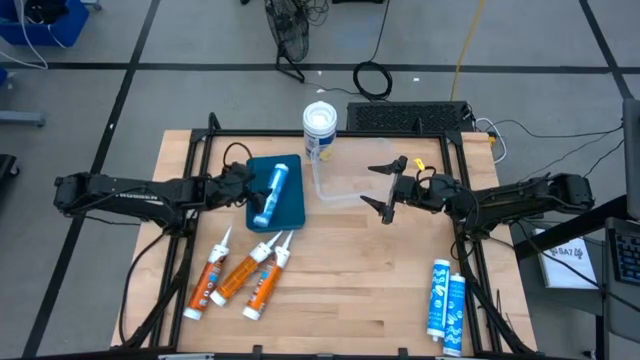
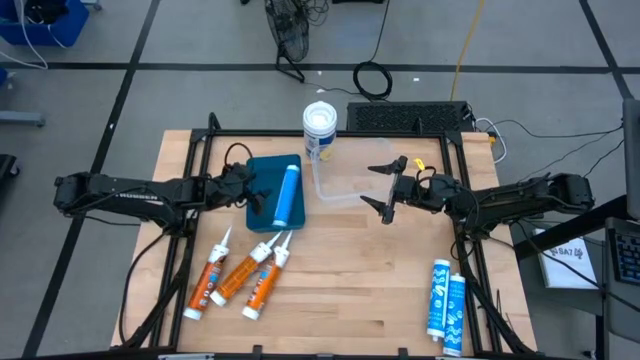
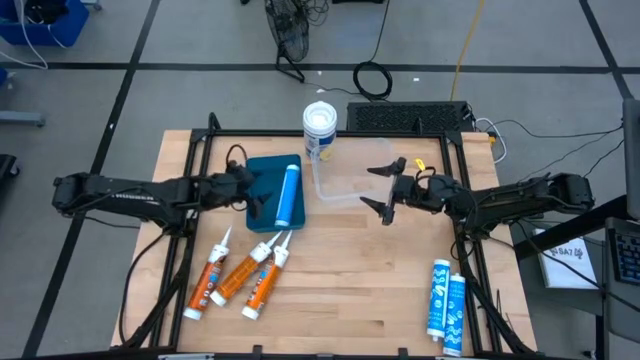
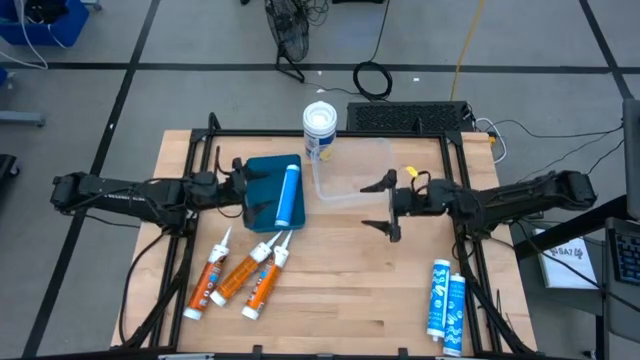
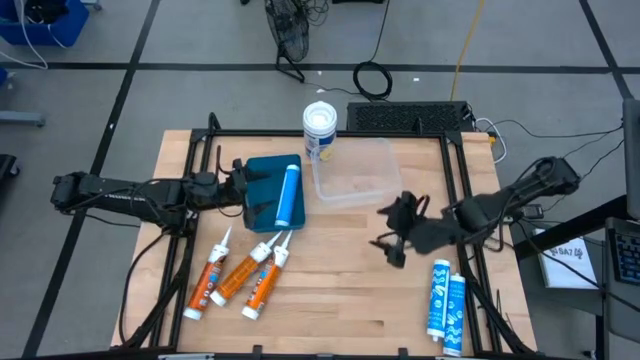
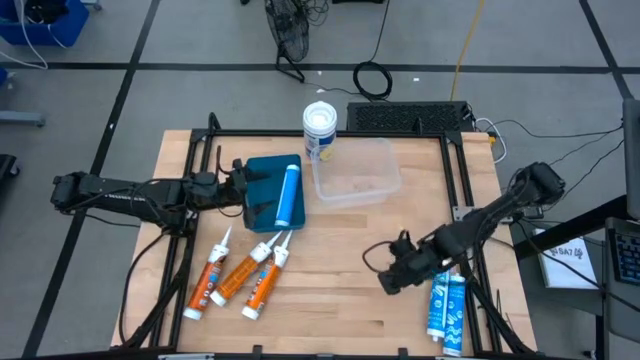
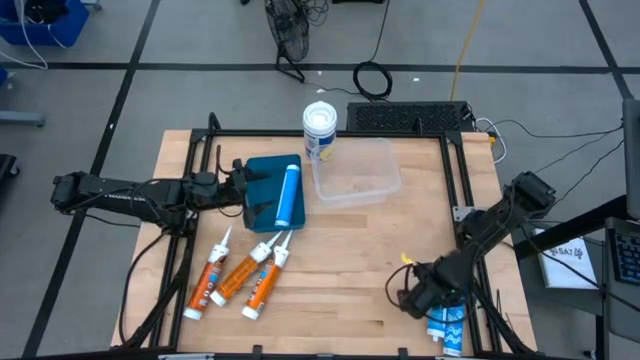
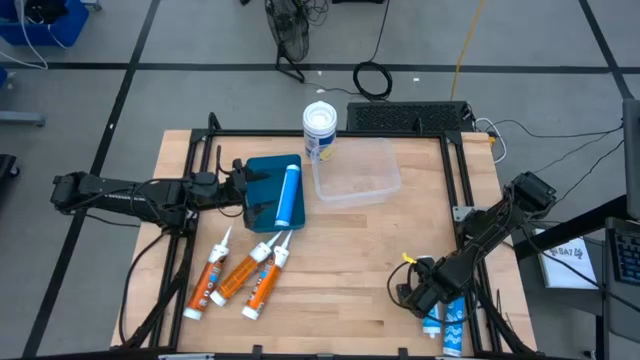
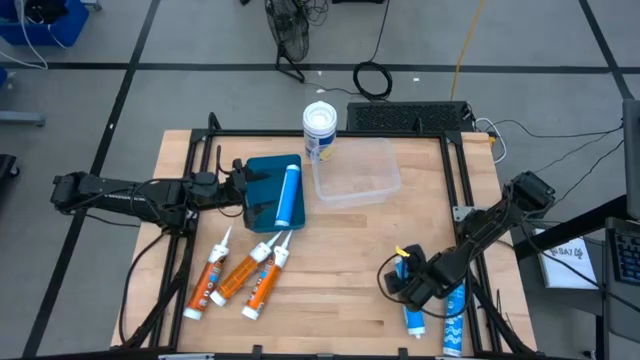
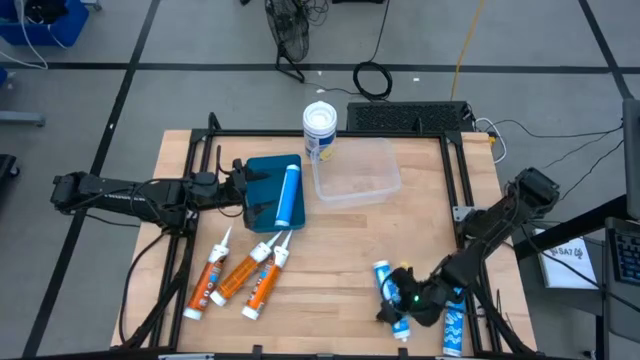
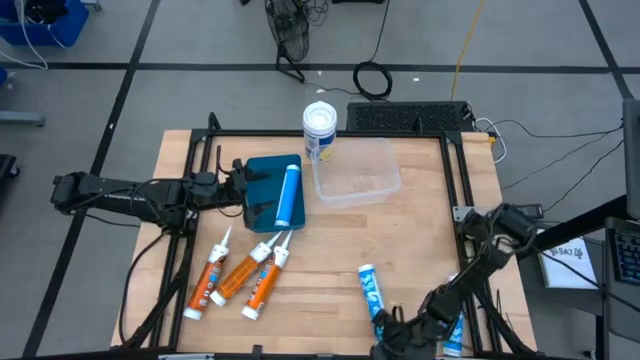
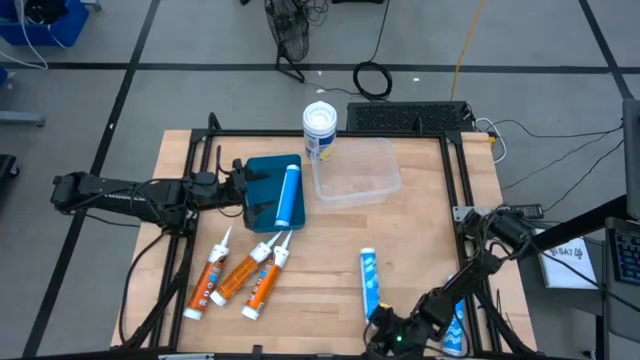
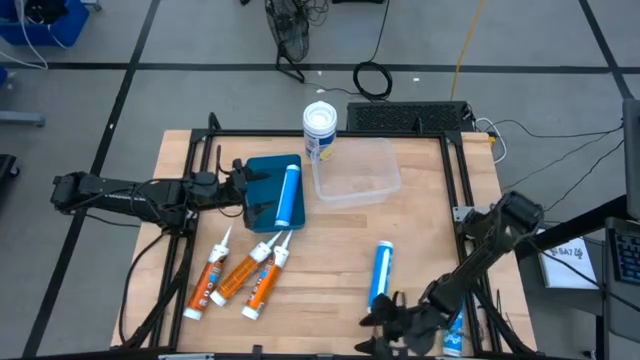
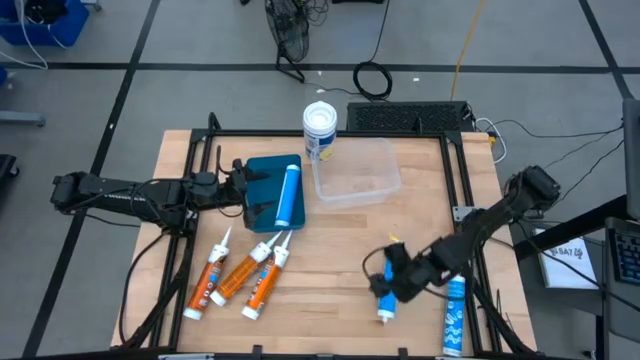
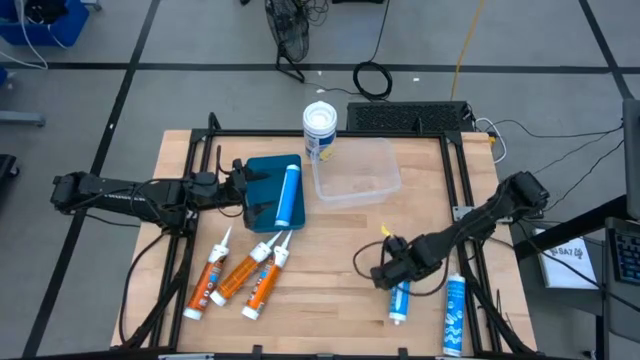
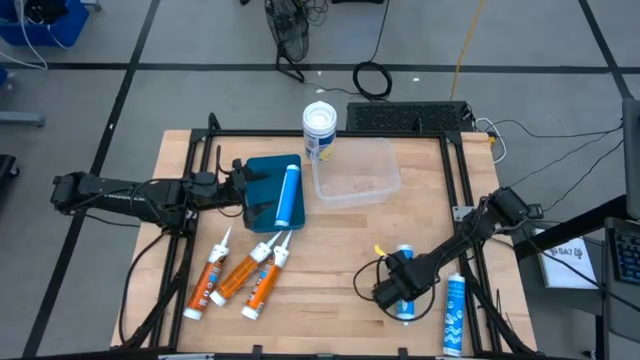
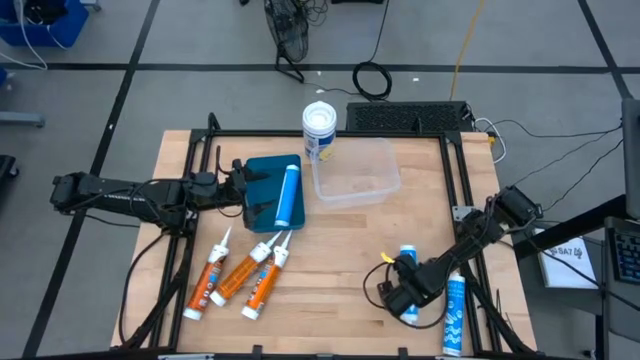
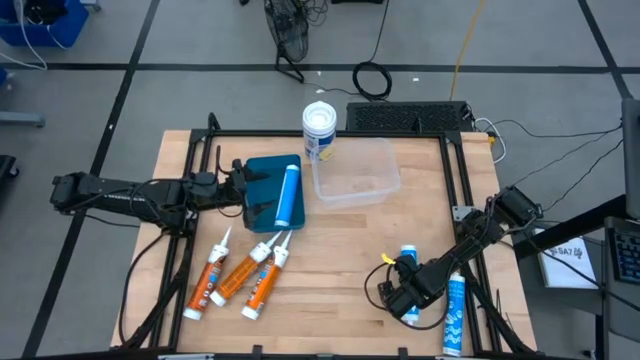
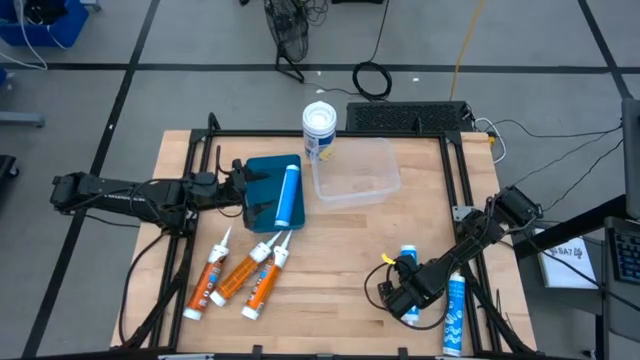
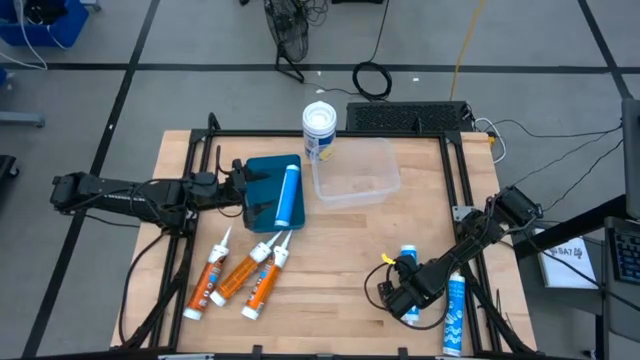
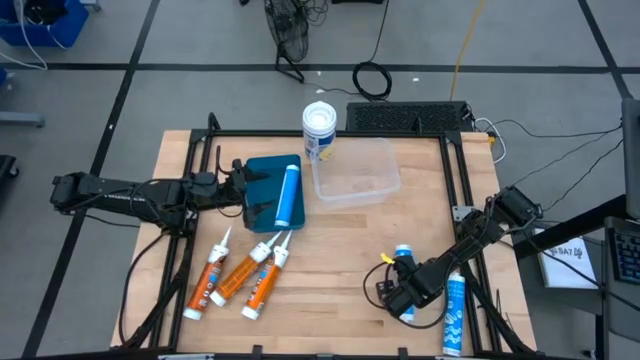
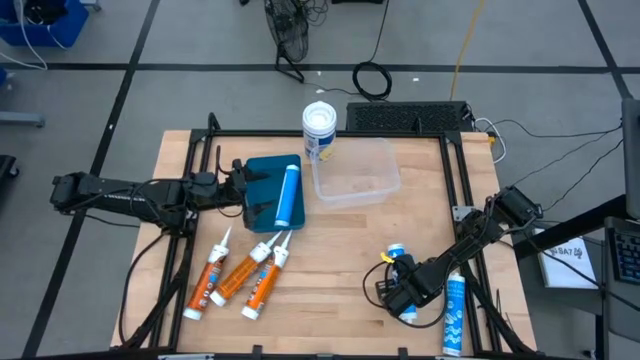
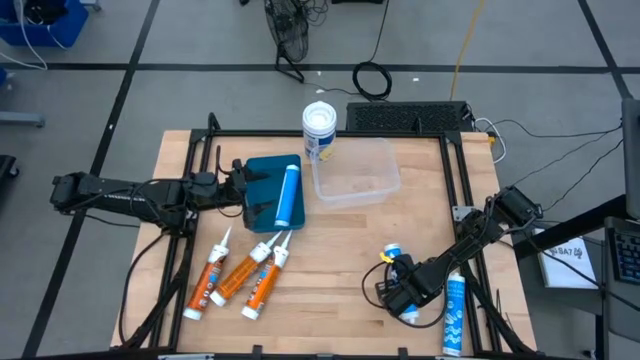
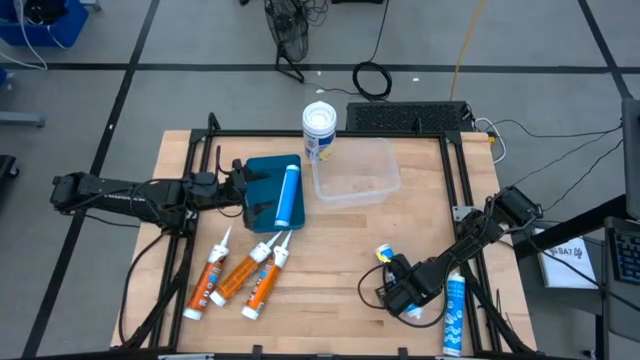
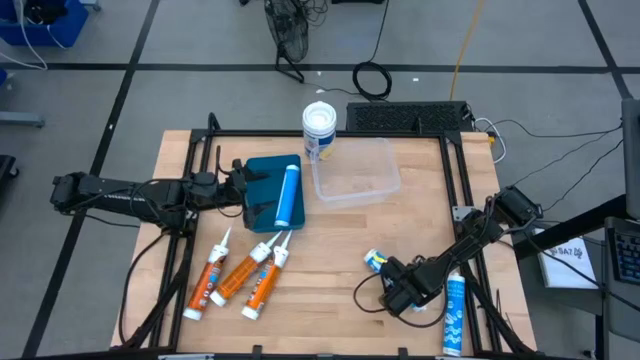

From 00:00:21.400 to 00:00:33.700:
Task: Pick & place silicon tubes, Sealant and Lysol wipes
Put the blue caulk tube into the blue bin

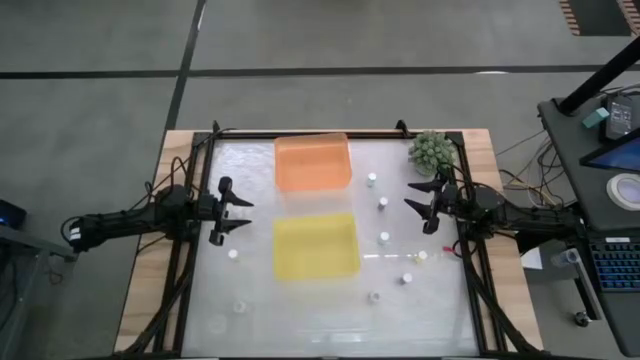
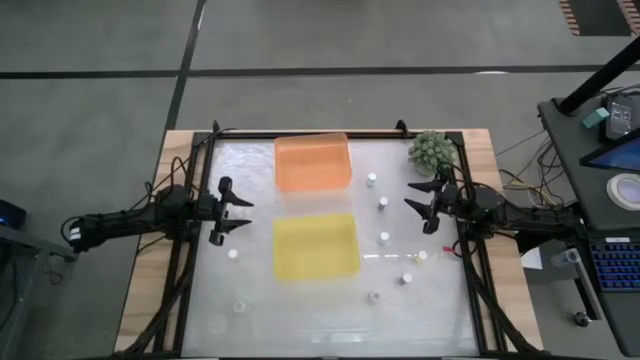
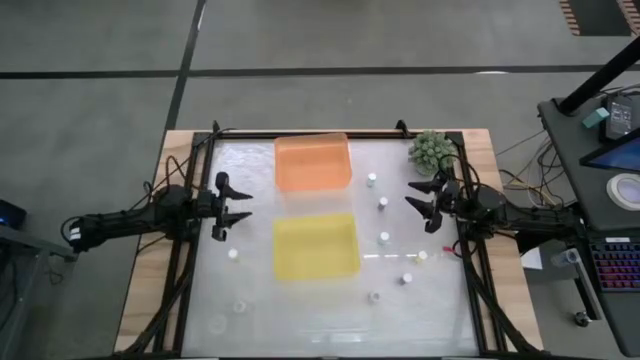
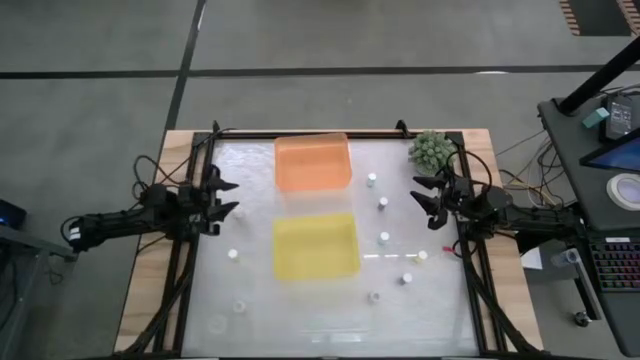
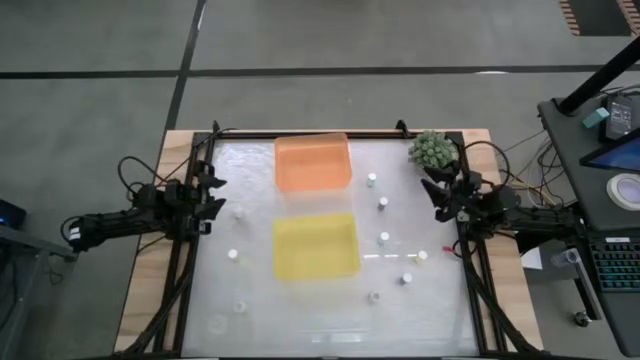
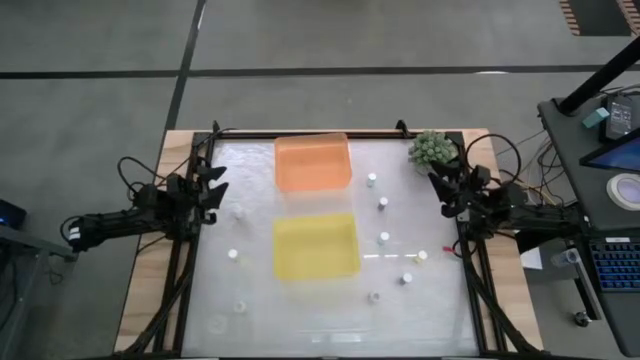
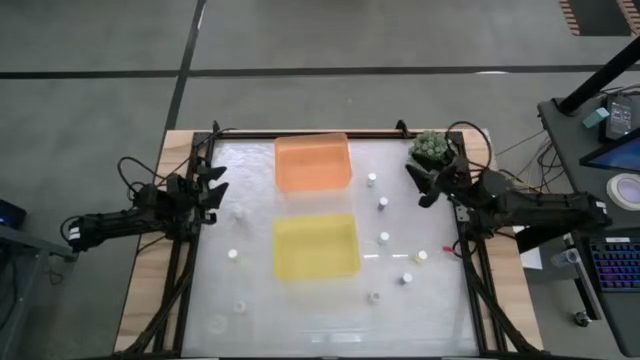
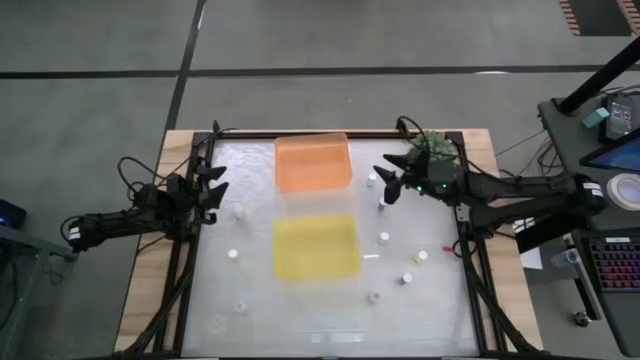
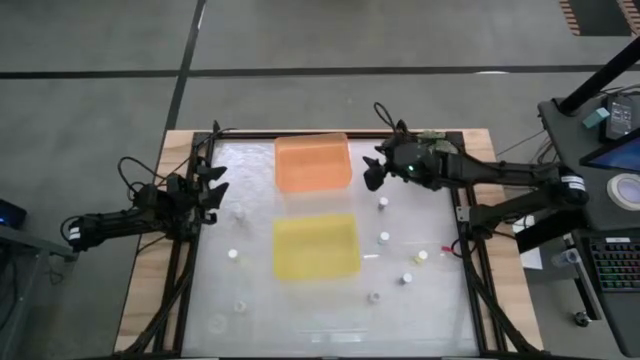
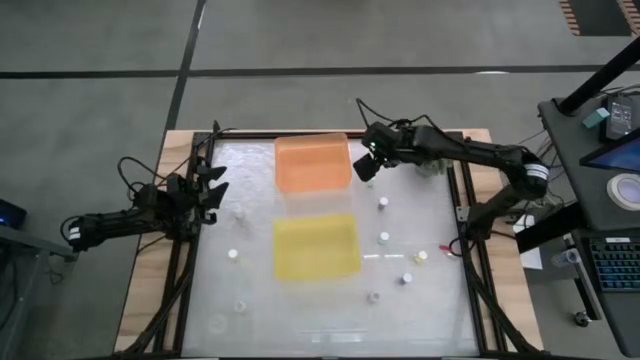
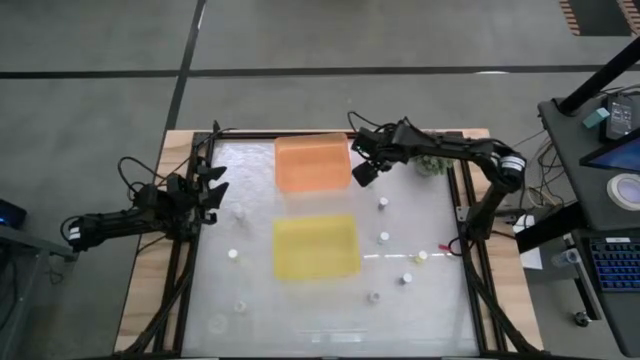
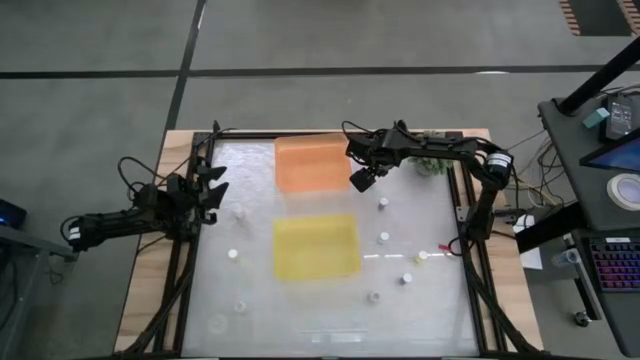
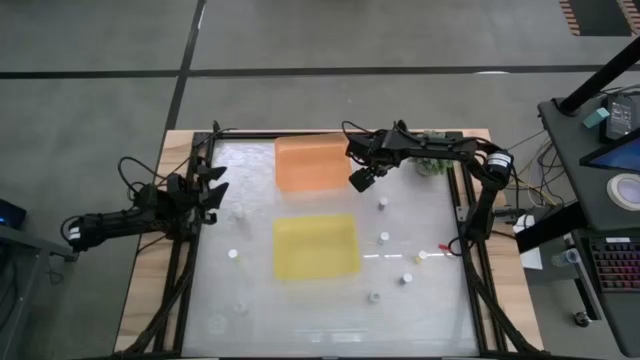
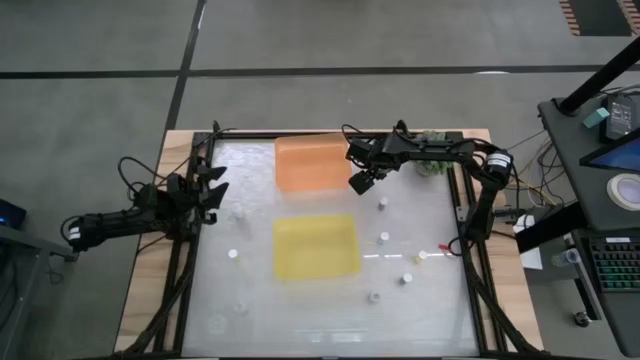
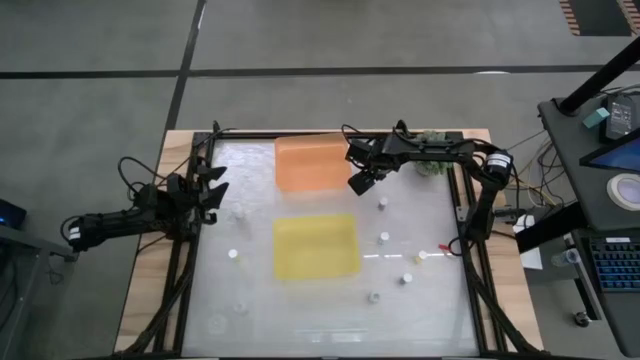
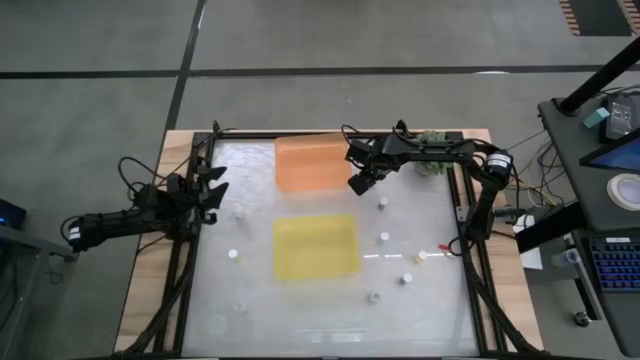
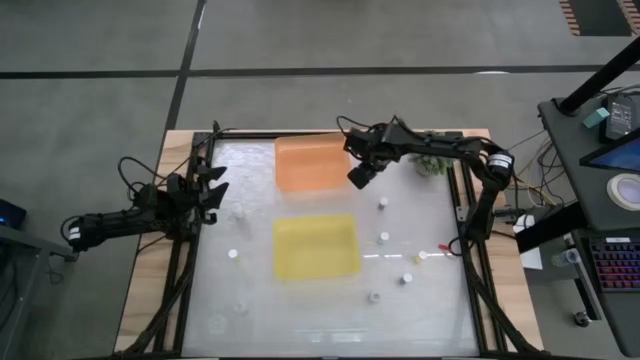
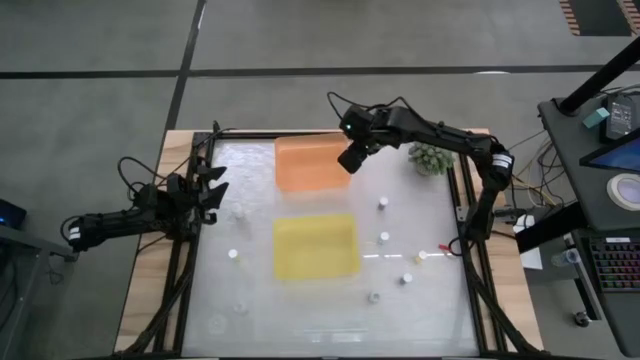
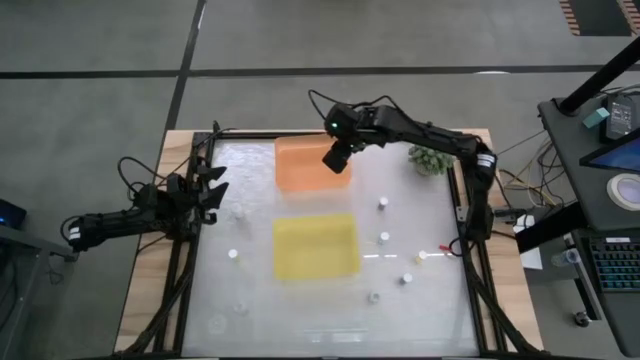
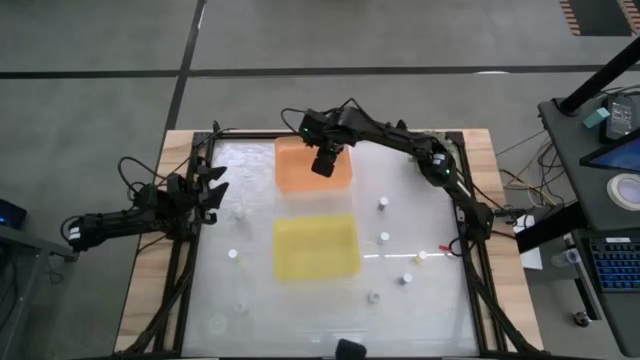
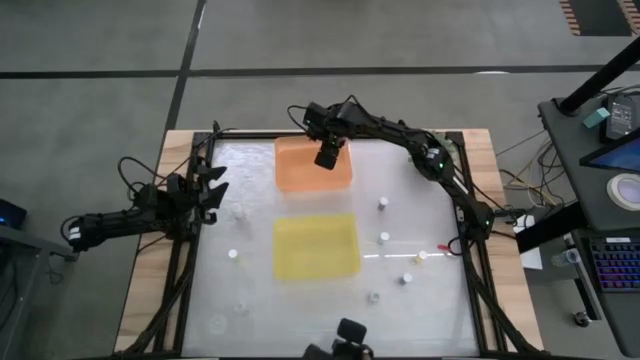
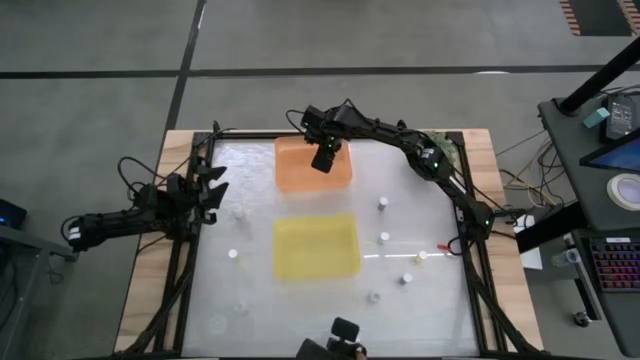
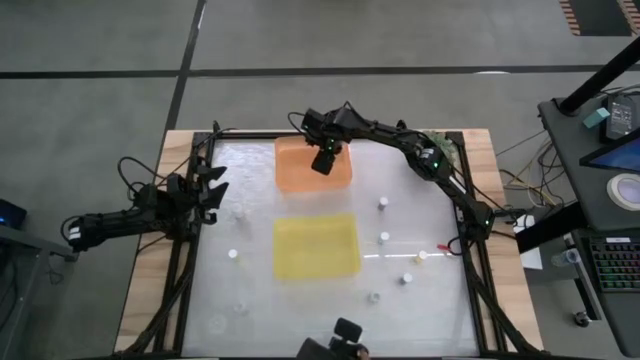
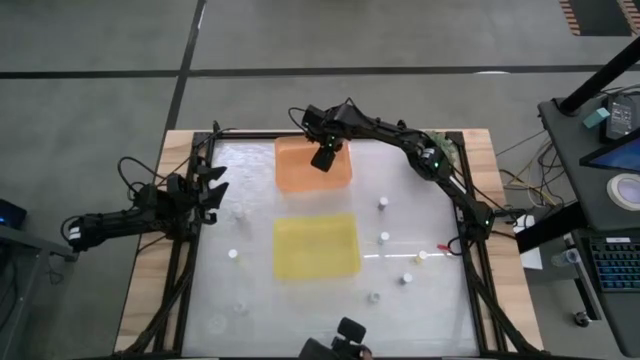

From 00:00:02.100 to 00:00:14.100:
Task: Pick and place medicine bottles into bin by pill shape (circle, oval)
Put the top green tablet bottle into the orange bin
